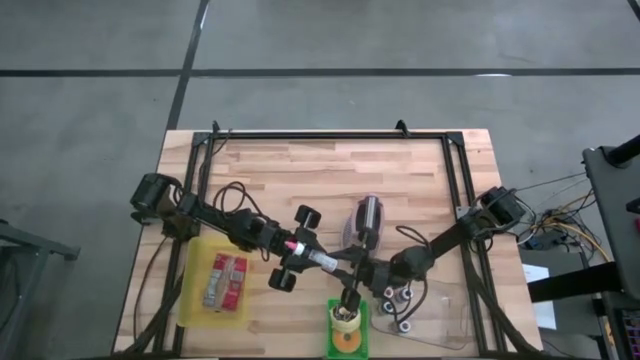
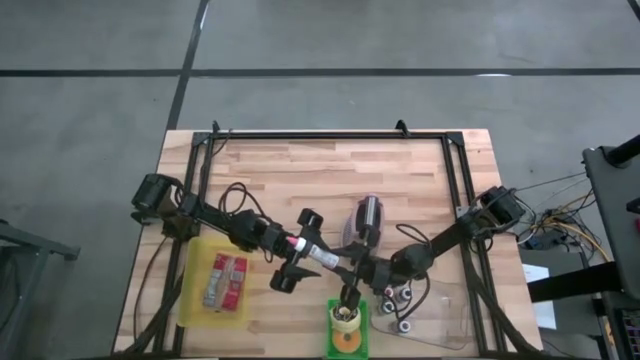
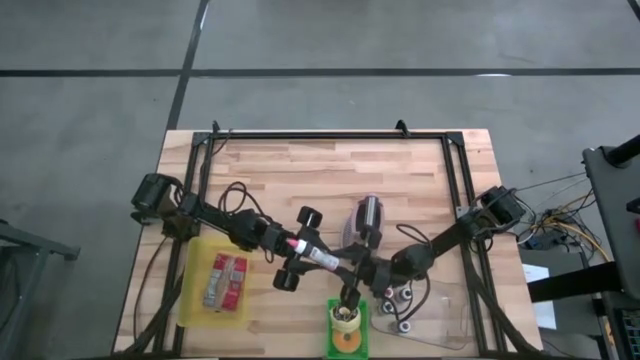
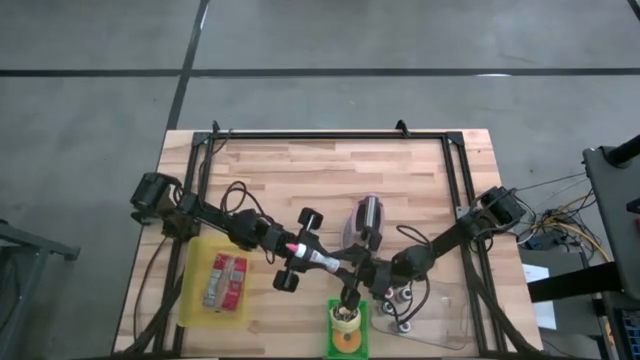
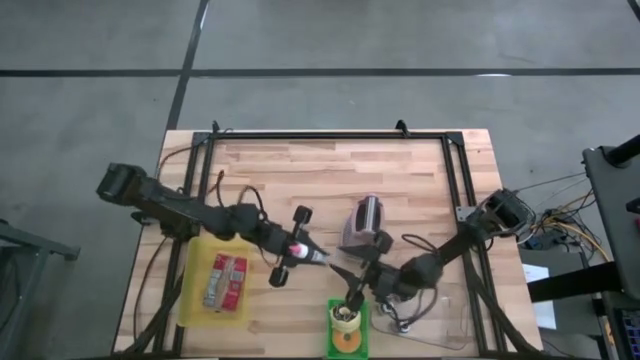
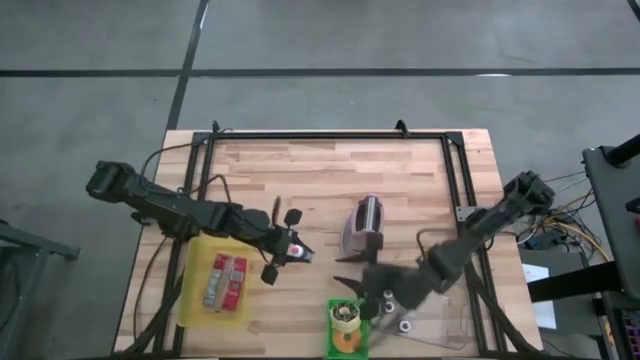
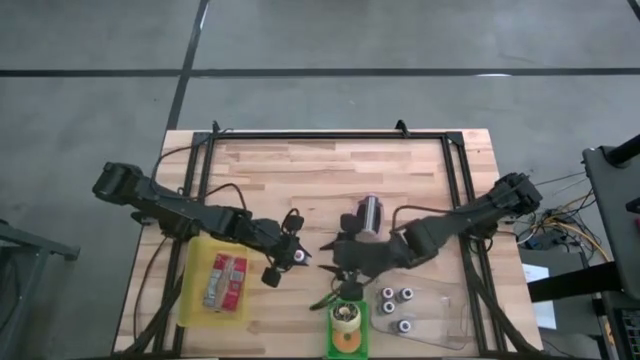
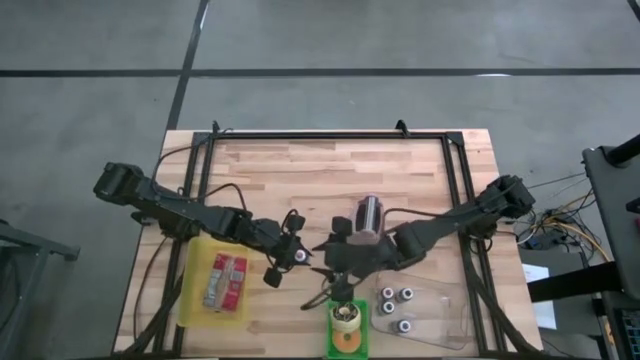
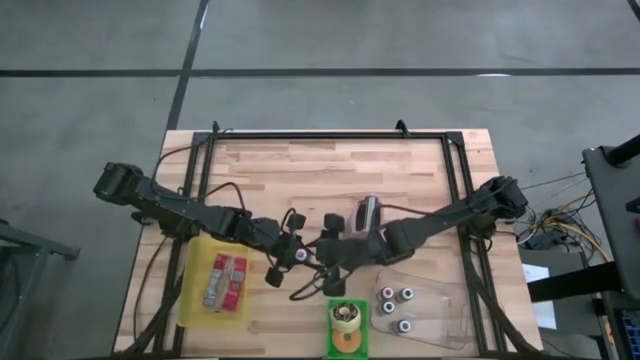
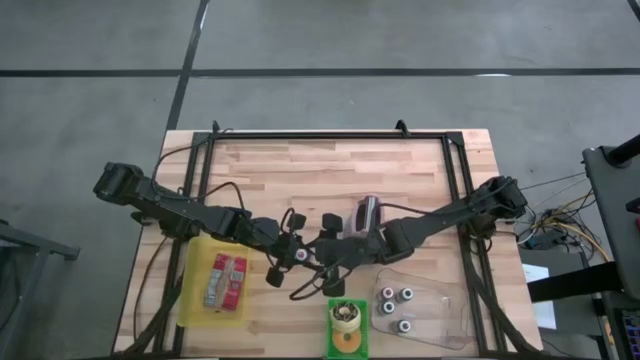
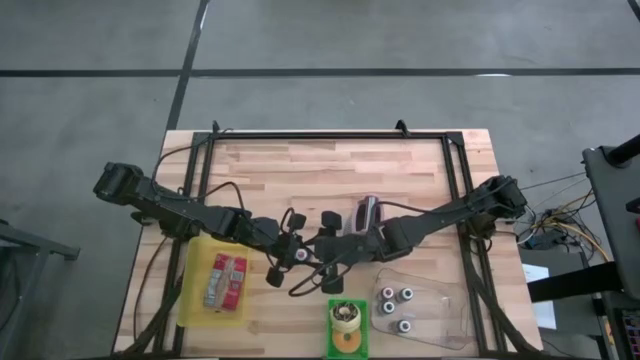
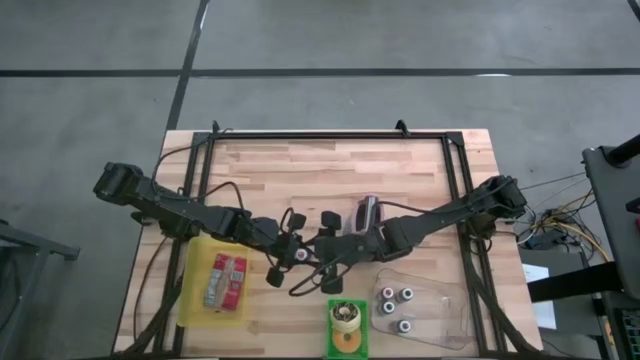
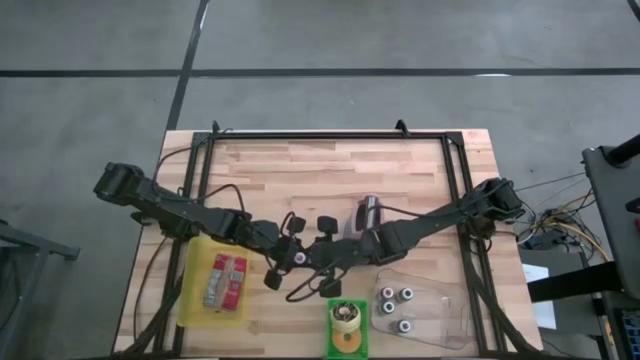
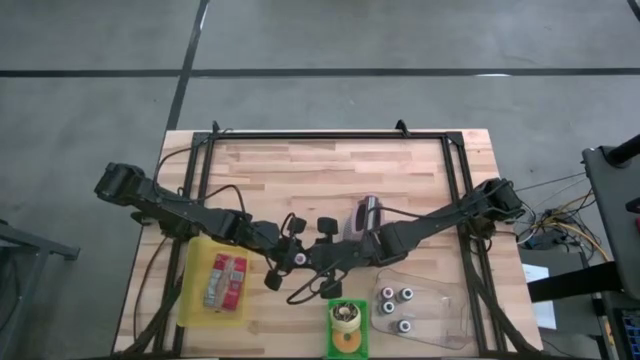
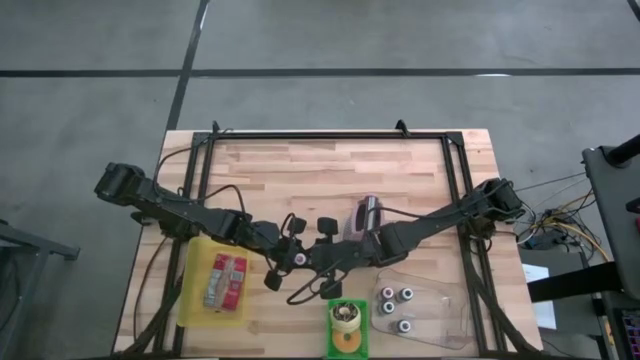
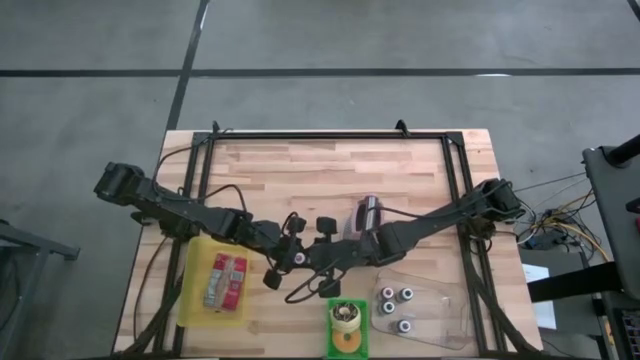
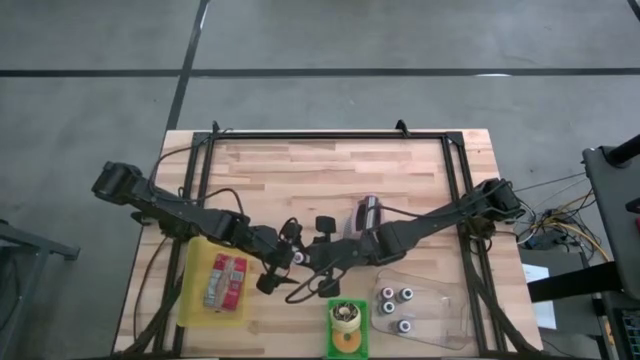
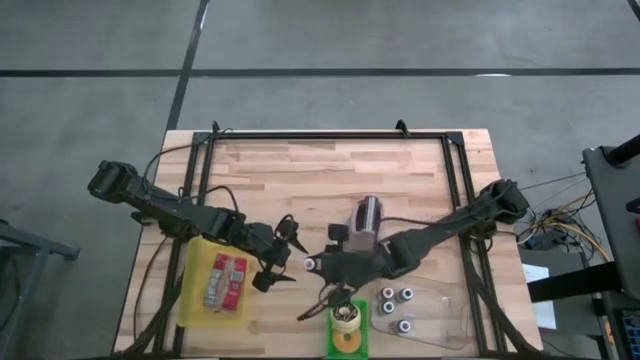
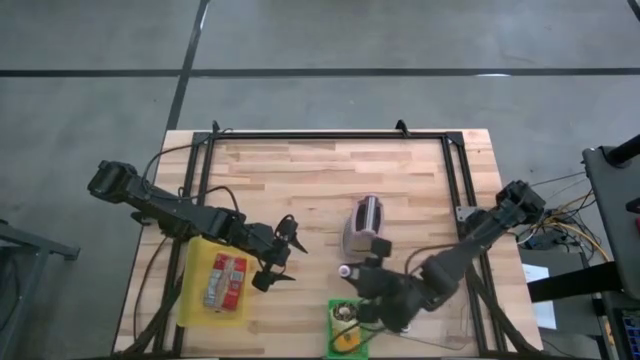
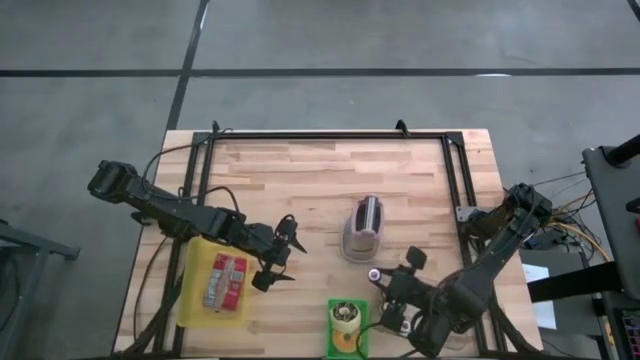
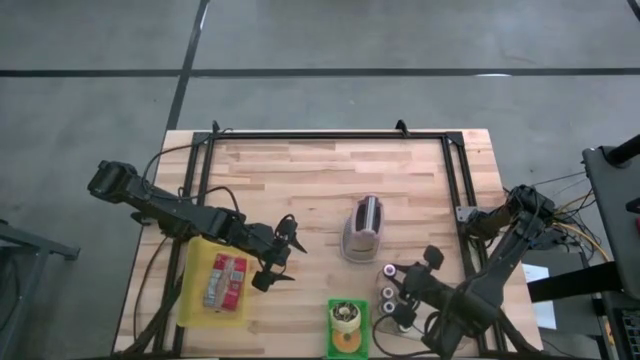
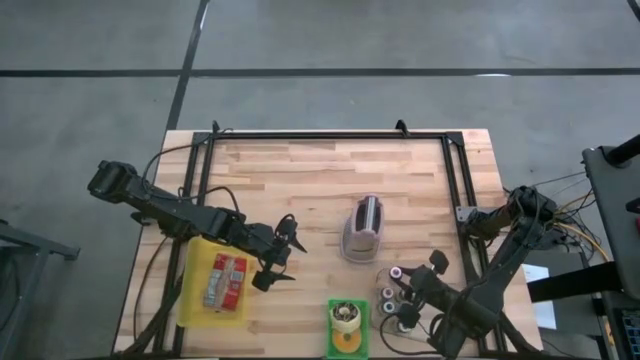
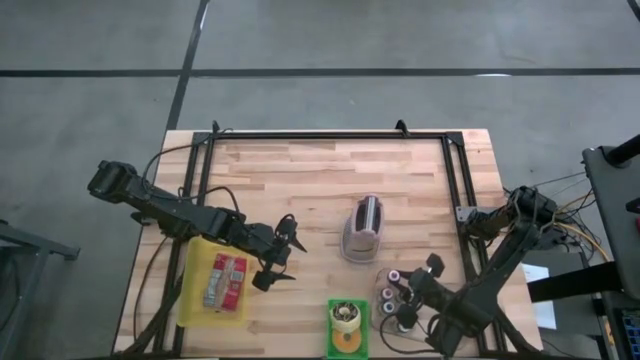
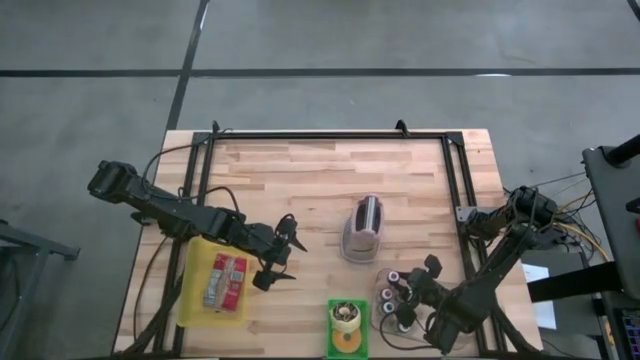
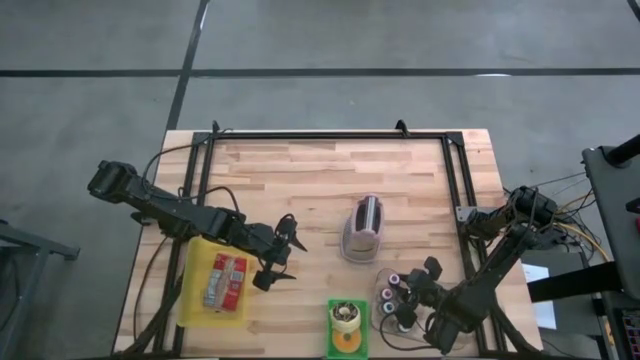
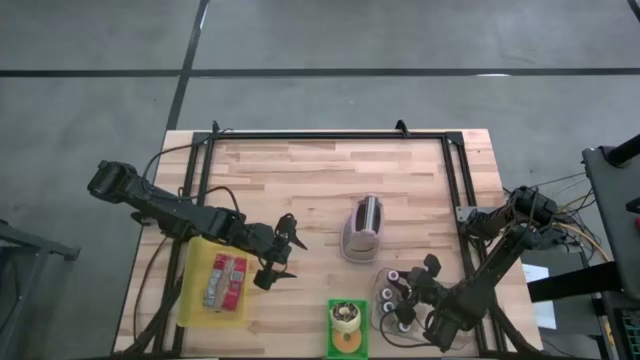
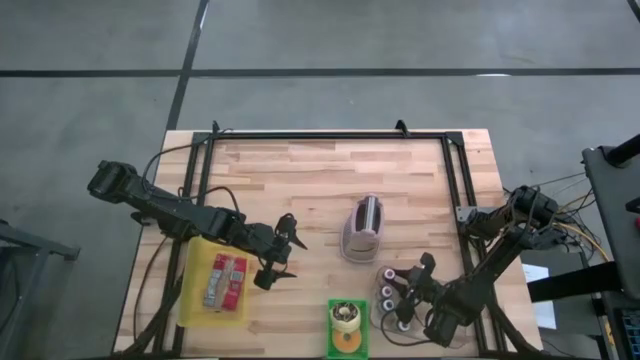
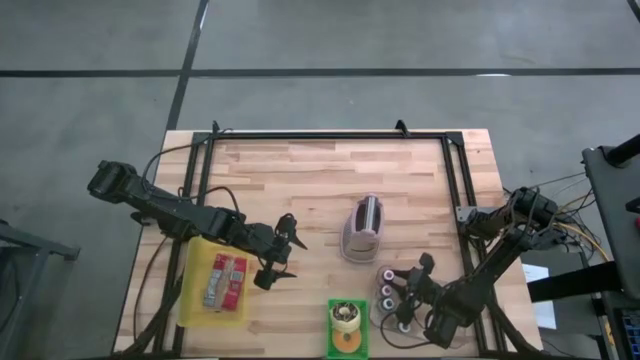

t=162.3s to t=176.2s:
Task: Pick & Place Food Item
Put the pink food coloring bottle into the transparent bin

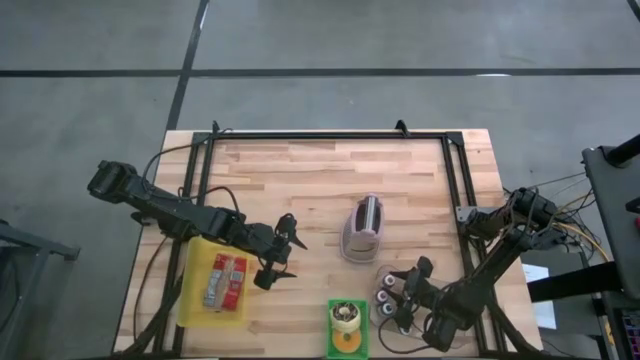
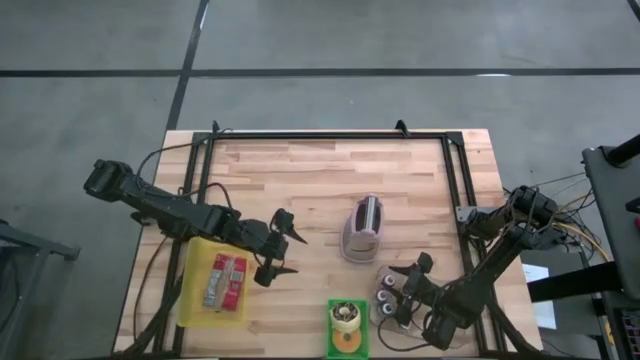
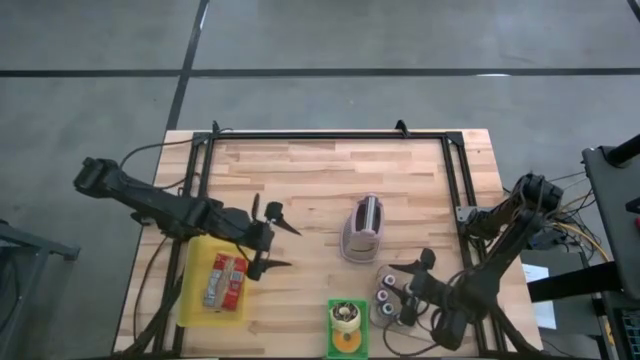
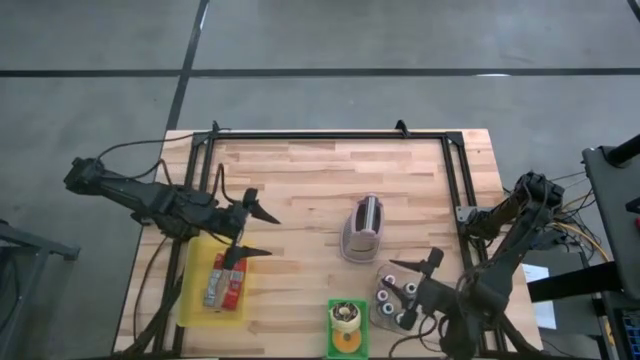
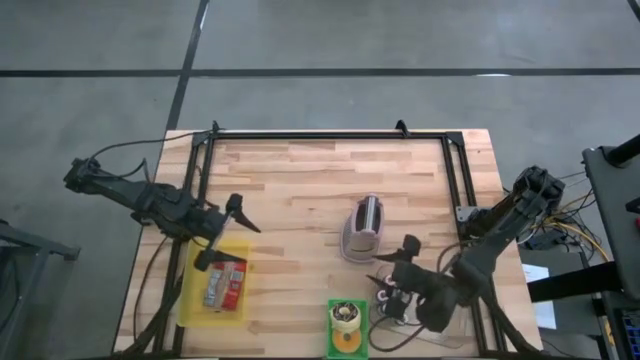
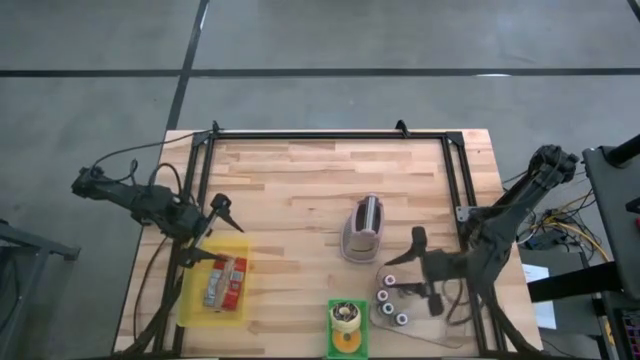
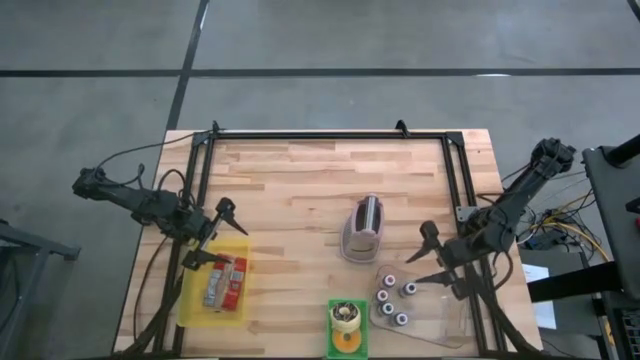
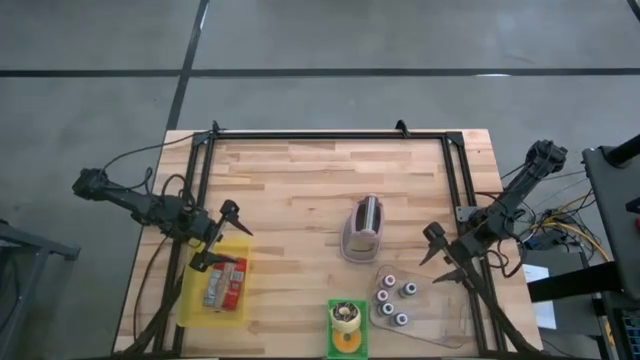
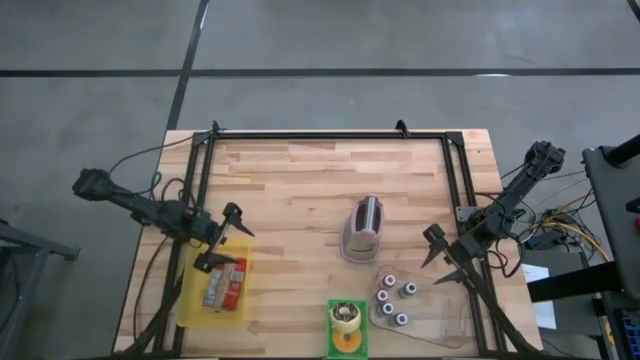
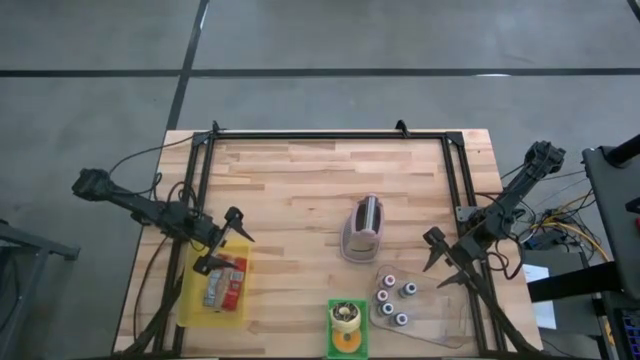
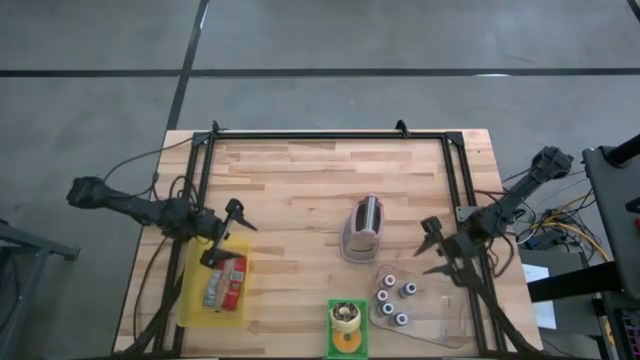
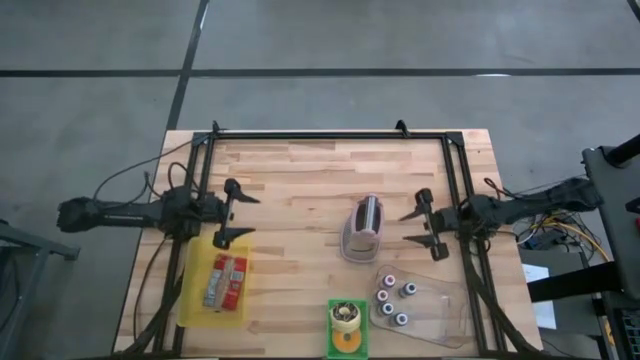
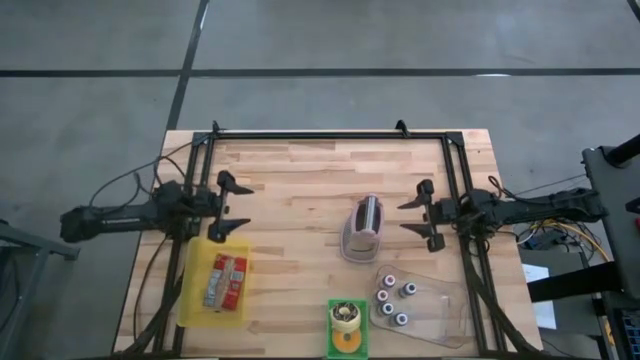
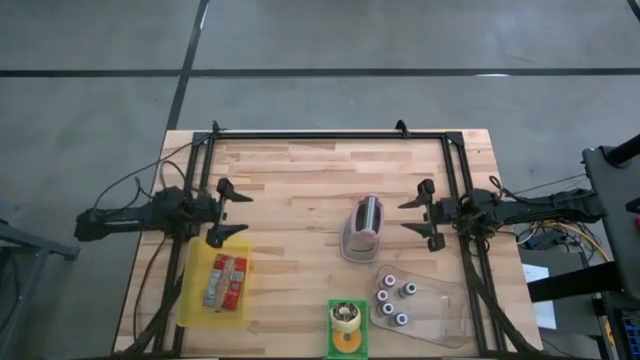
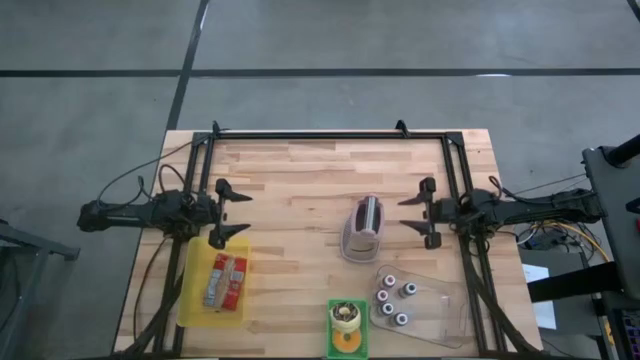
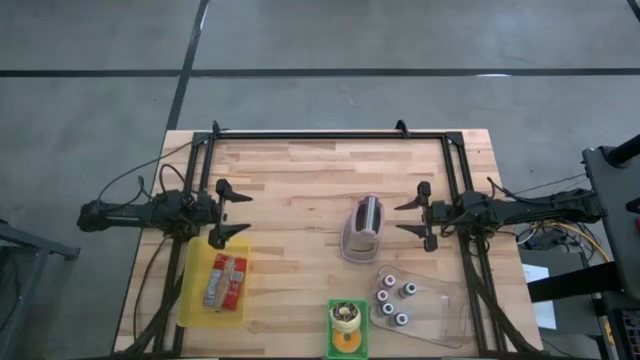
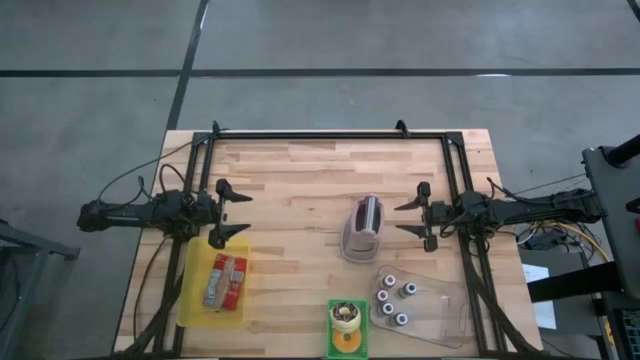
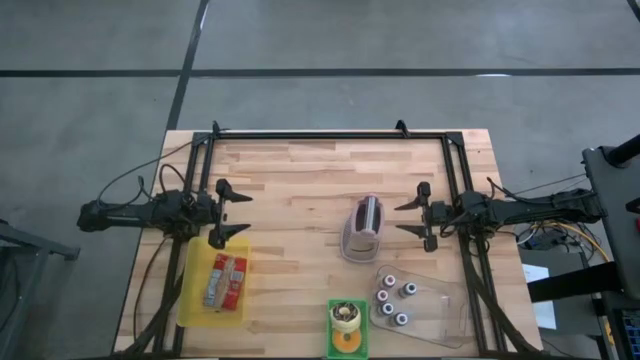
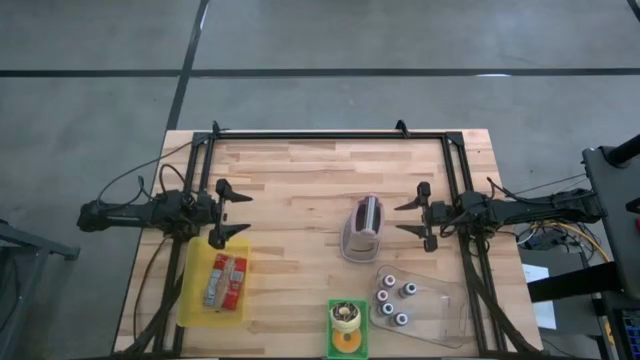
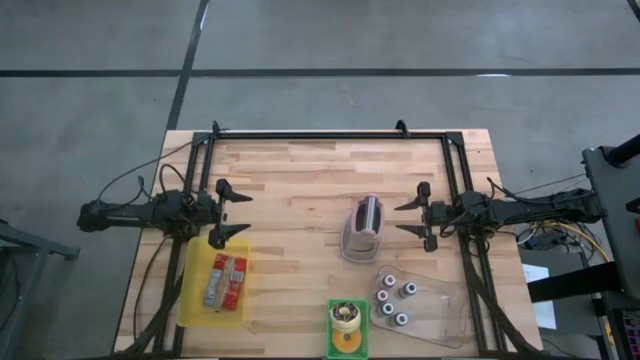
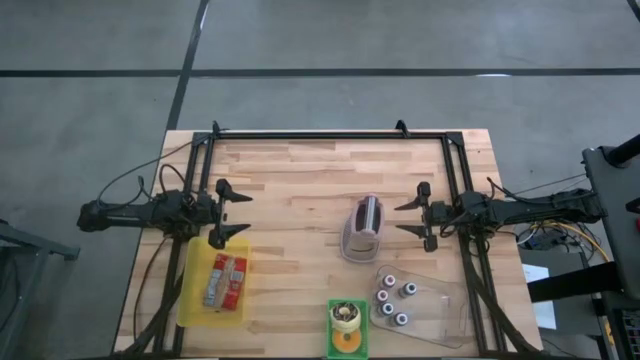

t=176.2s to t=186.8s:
Return to Home Position
